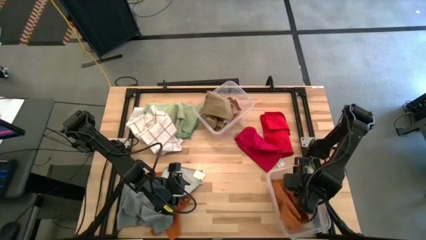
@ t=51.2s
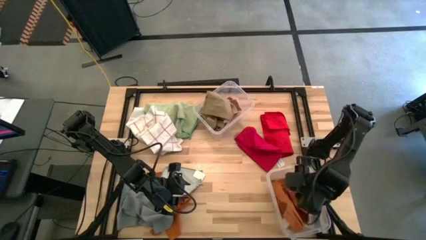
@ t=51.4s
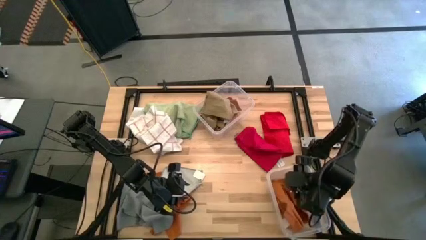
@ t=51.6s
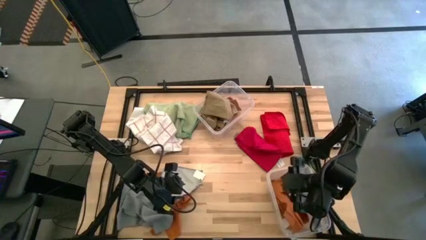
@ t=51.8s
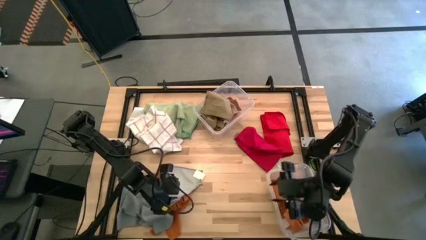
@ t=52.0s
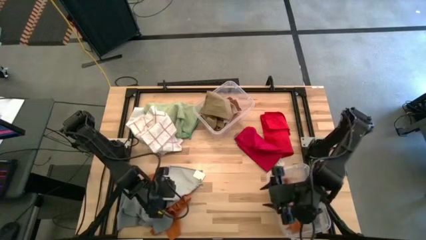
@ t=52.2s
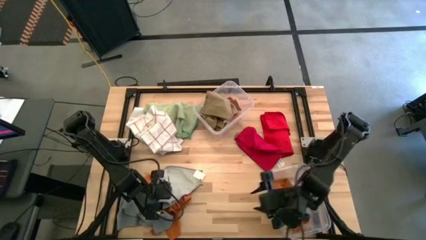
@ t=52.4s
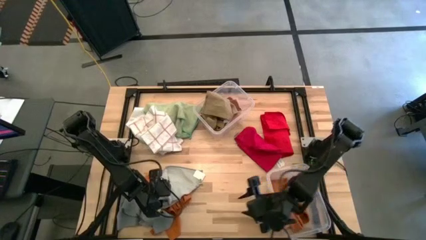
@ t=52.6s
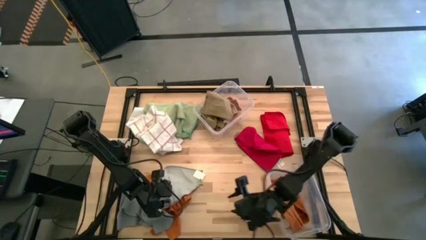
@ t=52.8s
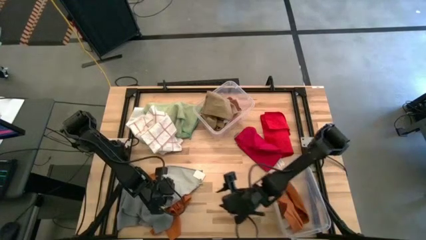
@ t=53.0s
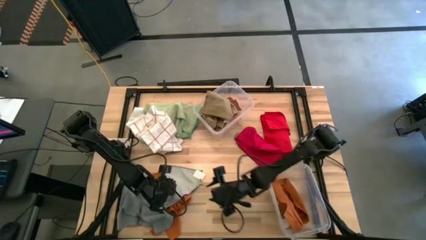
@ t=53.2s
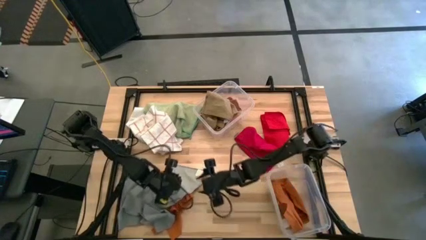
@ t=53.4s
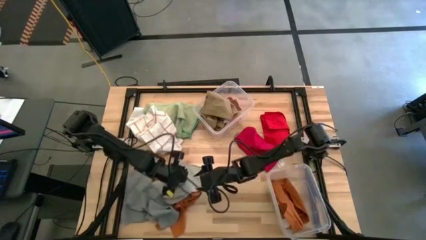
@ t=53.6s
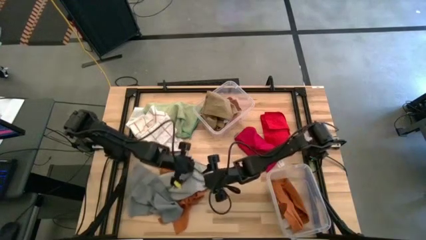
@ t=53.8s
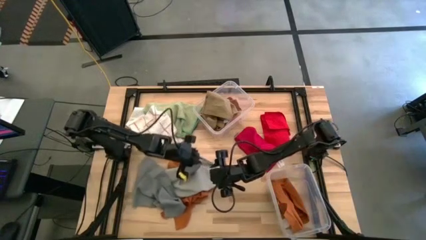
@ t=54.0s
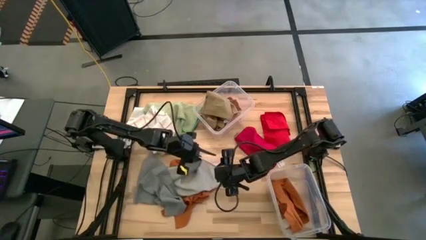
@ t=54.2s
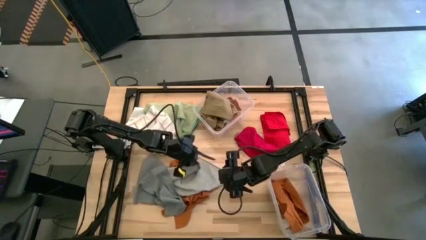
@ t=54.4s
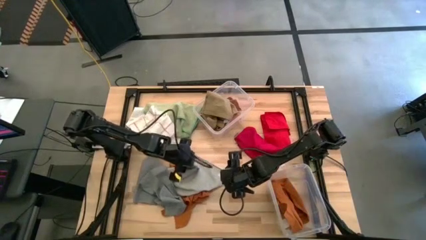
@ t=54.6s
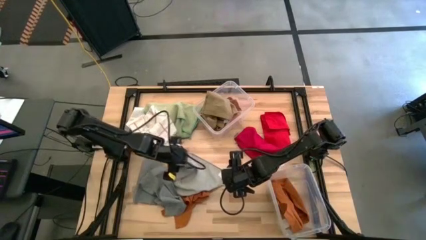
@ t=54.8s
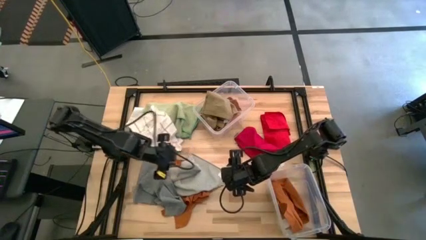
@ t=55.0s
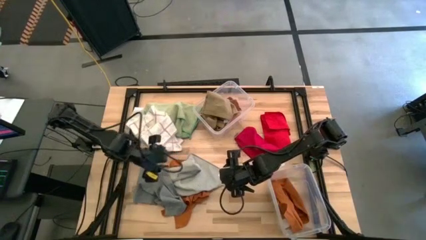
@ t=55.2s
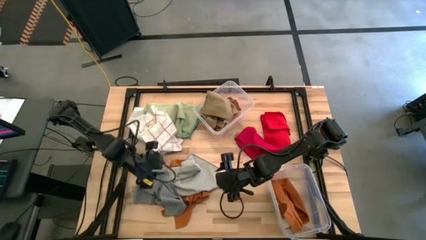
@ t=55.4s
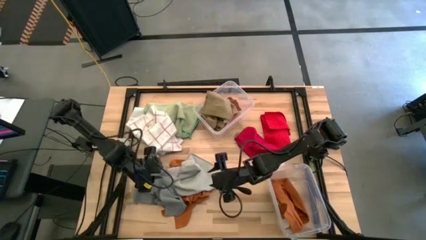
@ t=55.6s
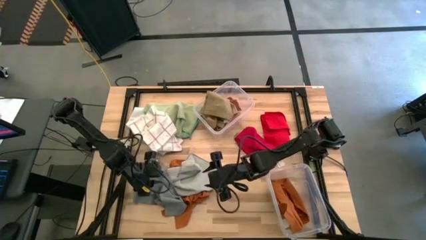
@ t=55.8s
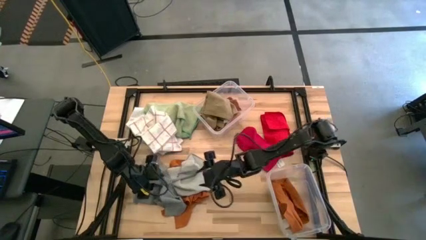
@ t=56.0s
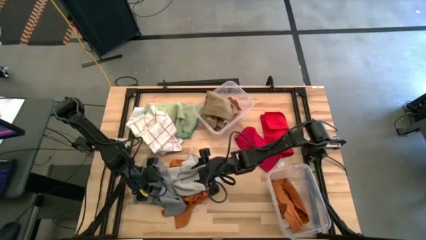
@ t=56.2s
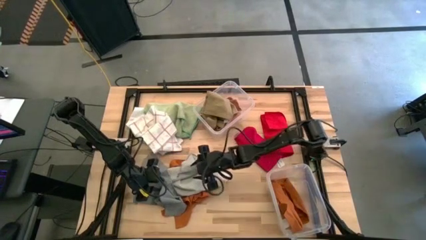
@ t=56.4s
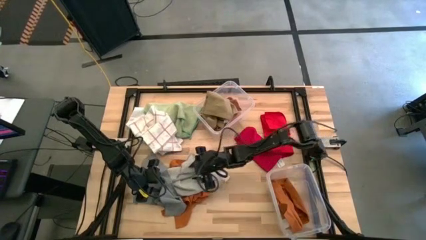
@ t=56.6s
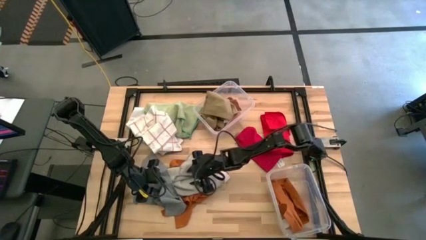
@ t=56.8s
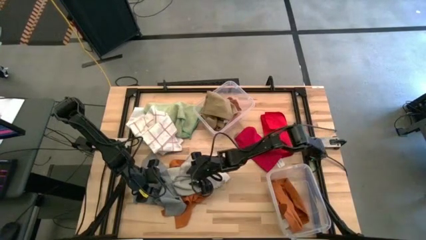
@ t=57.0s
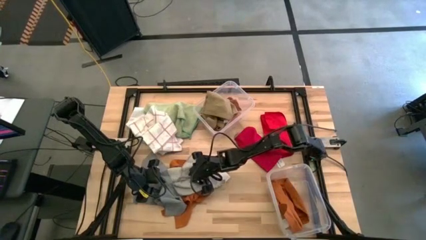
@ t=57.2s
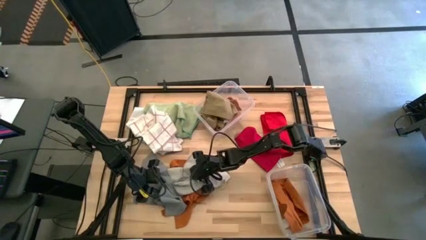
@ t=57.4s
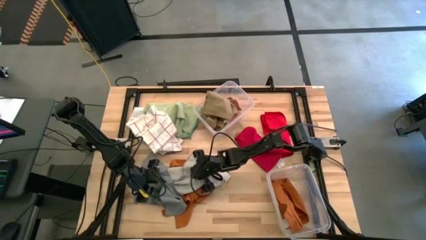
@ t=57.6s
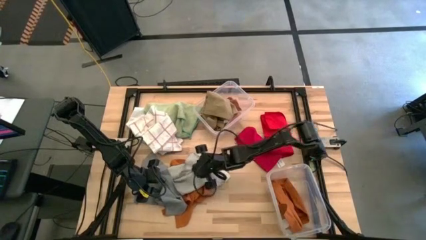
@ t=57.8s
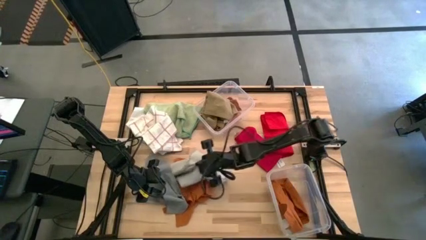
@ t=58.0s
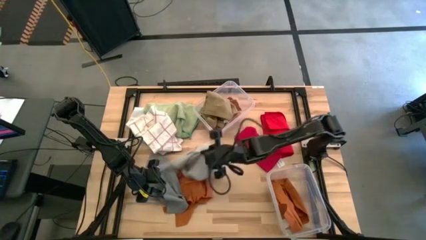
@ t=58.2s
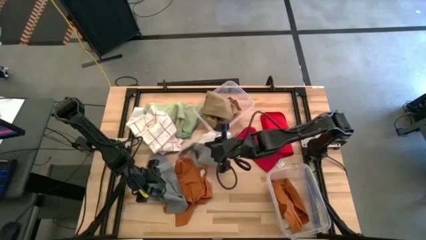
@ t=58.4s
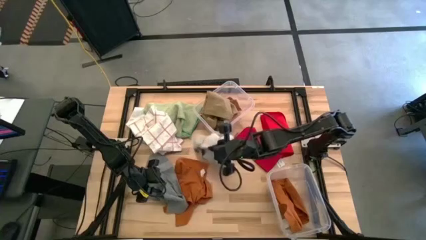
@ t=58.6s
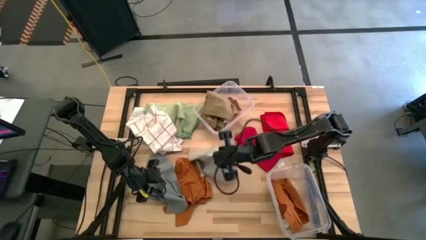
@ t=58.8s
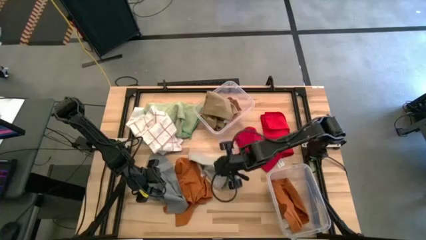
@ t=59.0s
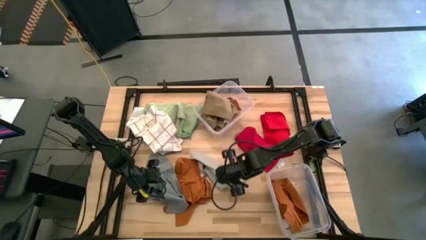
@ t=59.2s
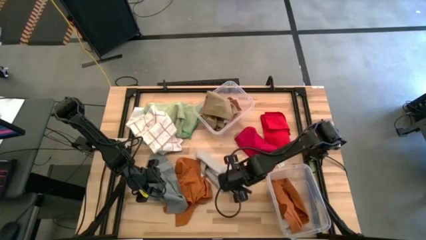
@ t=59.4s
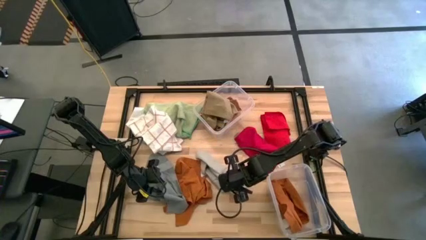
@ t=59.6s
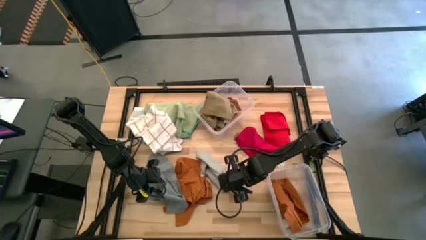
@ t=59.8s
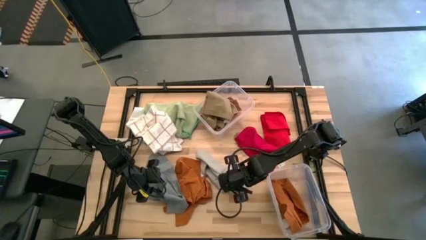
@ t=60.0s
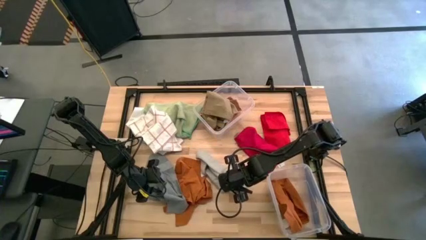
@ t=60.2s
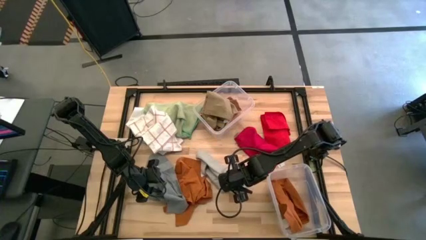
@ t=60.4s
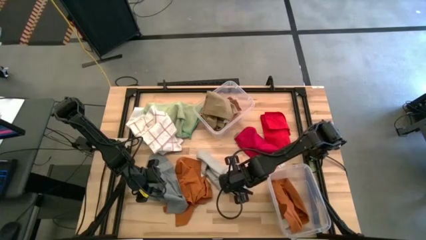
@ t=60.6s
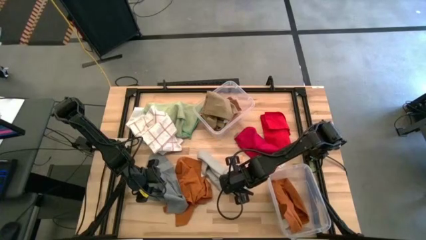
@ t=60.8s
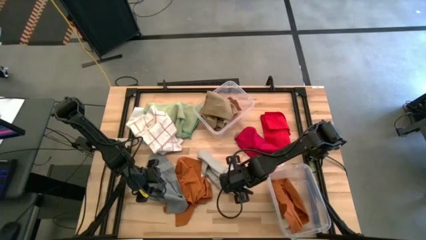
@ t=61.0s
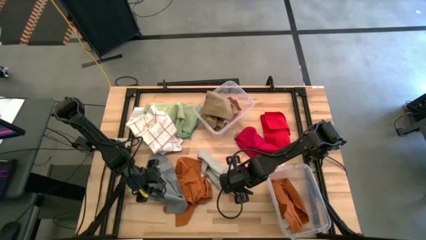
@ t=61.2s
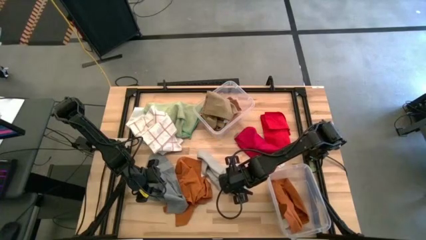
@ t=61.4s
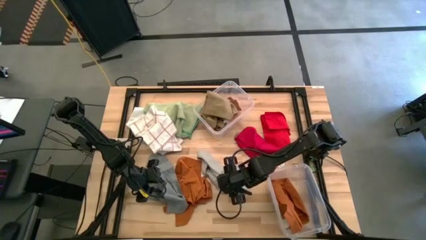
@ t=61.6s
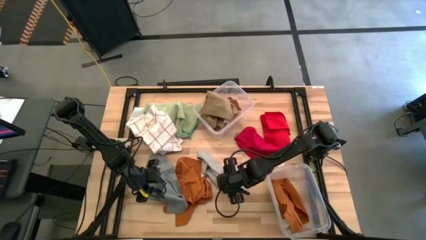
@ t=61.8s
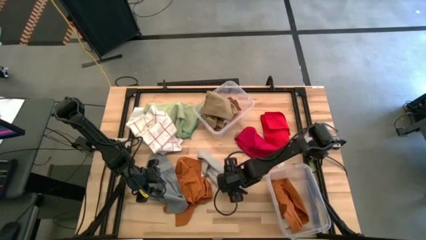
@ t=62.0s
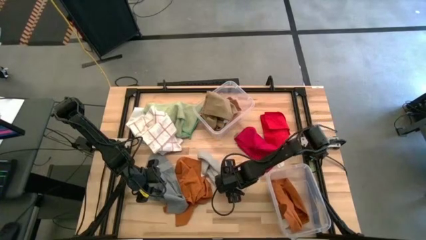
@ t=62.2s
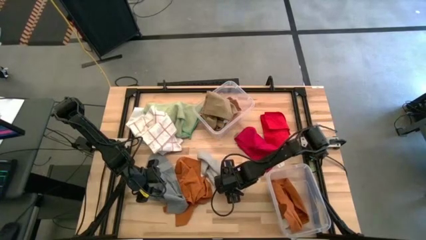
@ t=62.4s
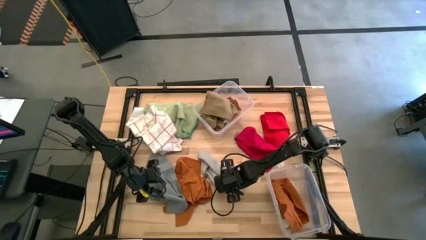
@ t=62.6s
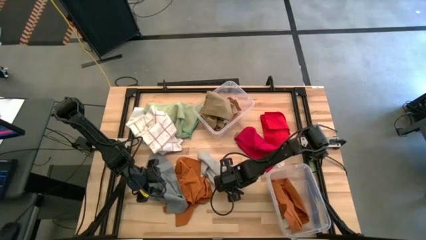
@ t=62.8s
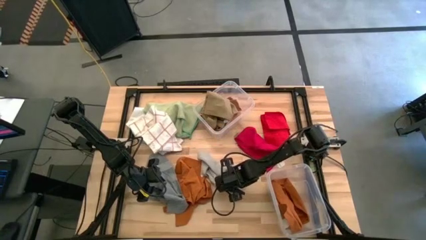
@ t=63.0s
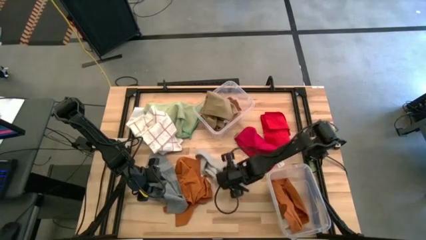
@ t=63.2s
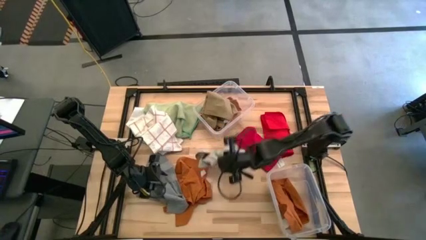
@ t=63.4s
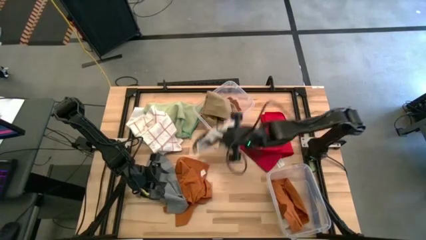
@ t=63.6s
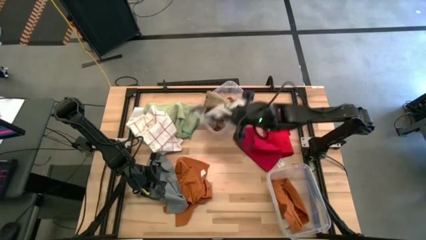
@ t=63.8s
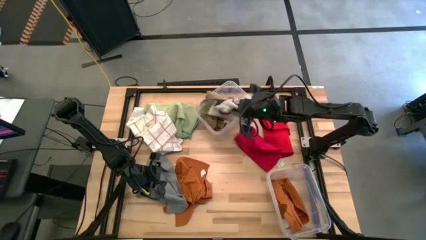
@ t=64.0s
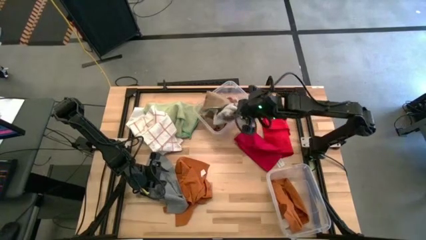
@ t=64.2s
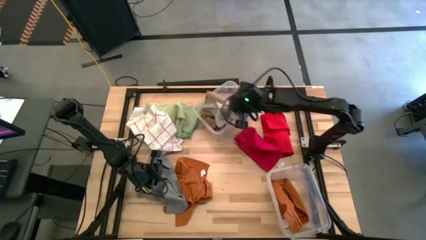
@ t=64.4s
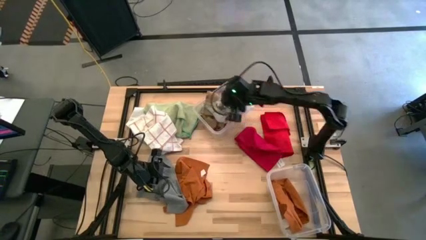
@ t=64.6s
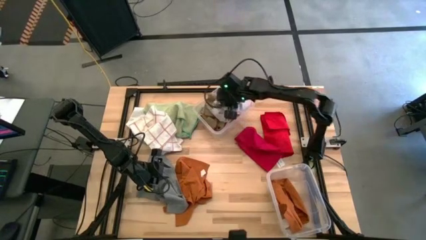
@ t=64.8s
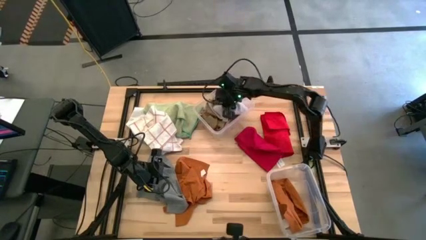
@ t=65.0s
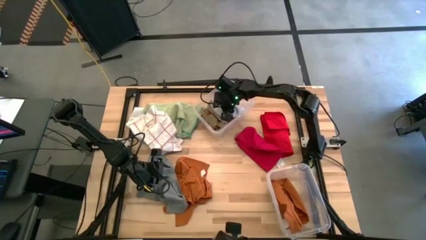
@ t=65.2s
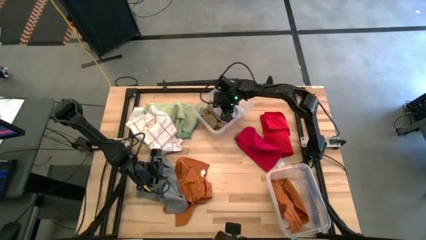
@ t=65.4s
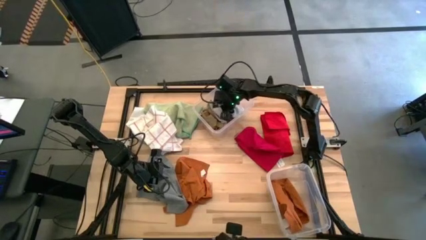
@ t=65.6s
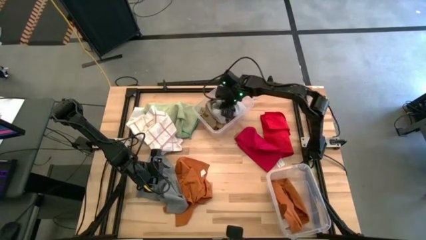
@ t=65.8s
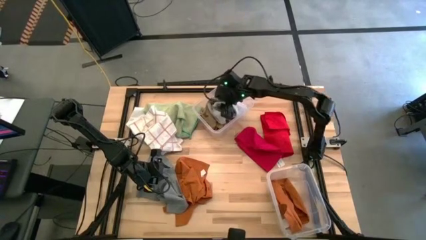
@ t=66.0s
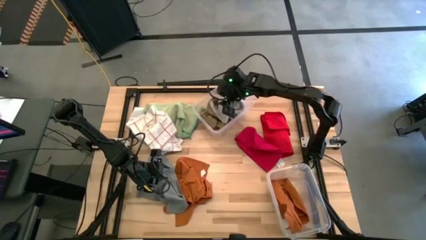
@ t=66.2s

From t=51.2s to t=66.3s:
Task: Sort towels by color in basket
Put the light gray towel into the top transparent bin
